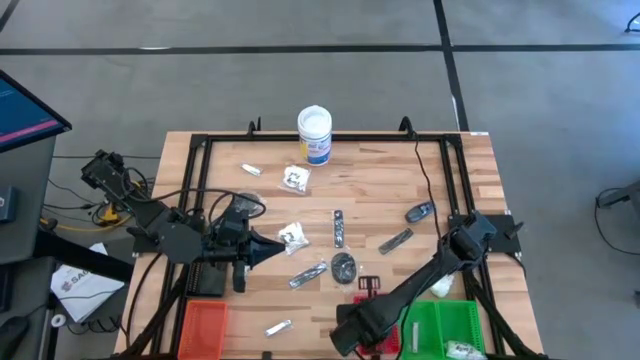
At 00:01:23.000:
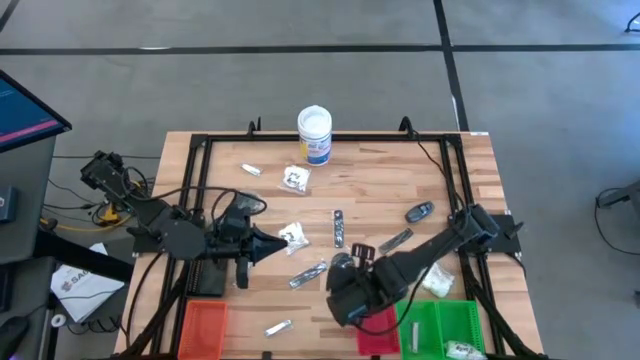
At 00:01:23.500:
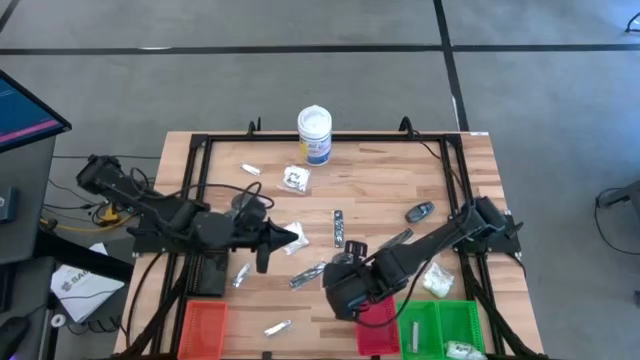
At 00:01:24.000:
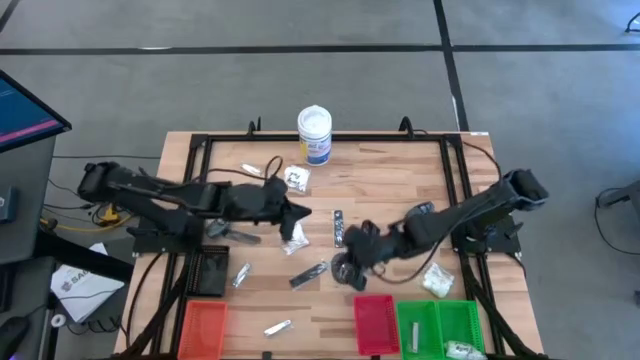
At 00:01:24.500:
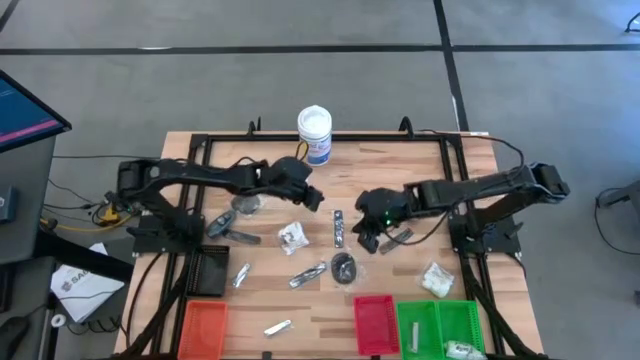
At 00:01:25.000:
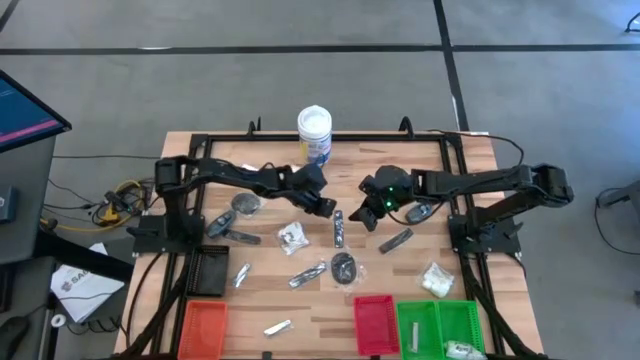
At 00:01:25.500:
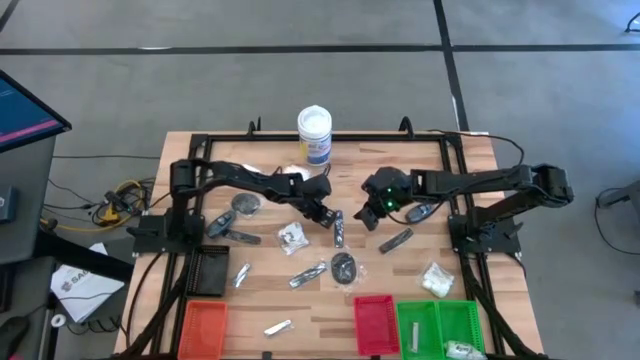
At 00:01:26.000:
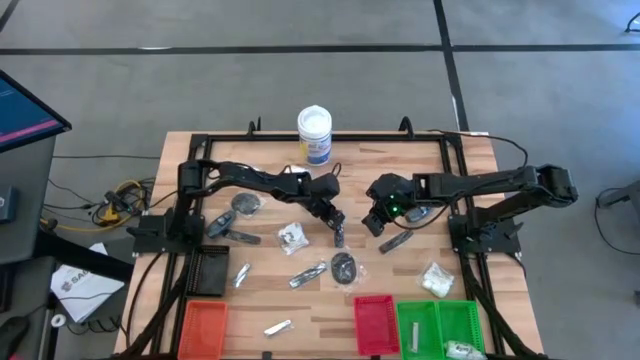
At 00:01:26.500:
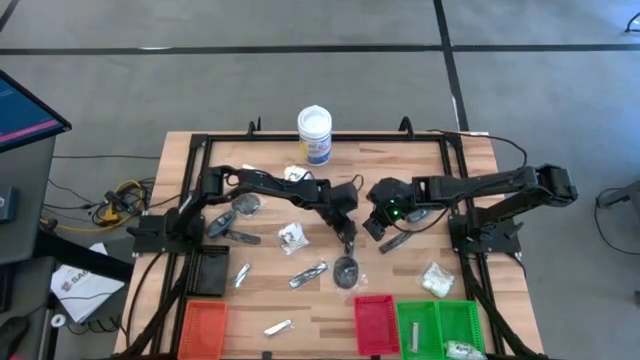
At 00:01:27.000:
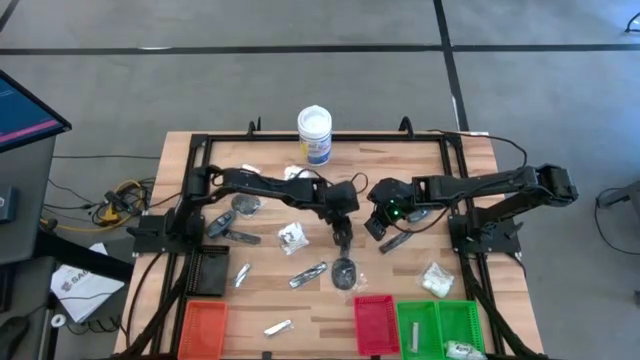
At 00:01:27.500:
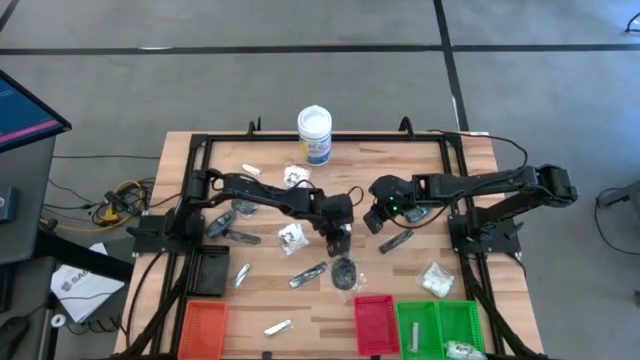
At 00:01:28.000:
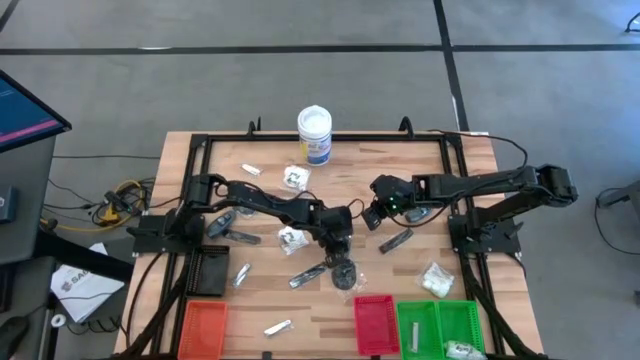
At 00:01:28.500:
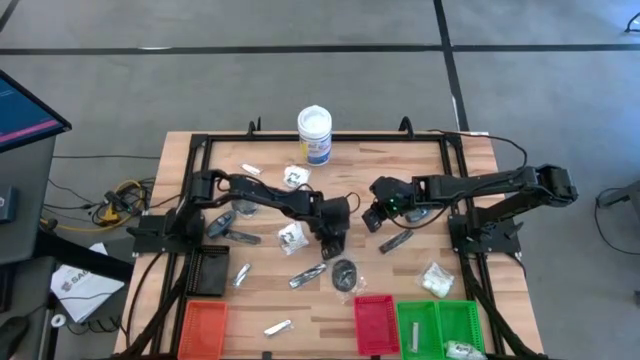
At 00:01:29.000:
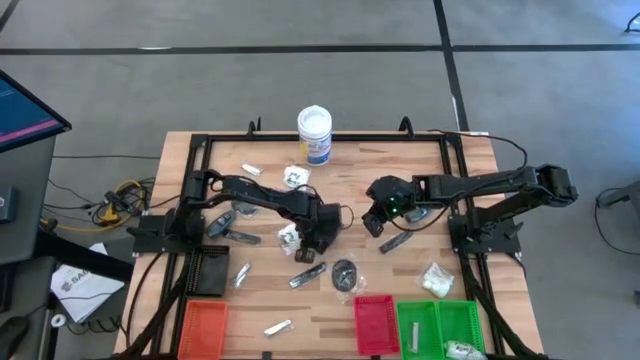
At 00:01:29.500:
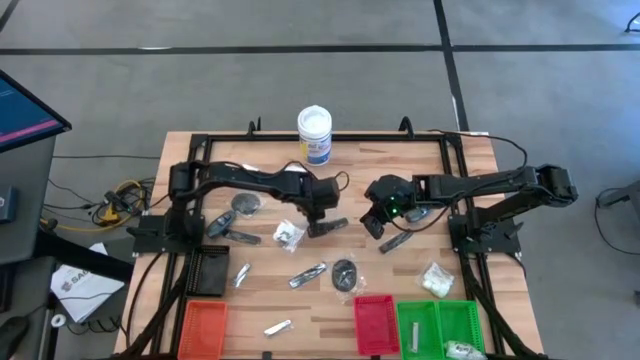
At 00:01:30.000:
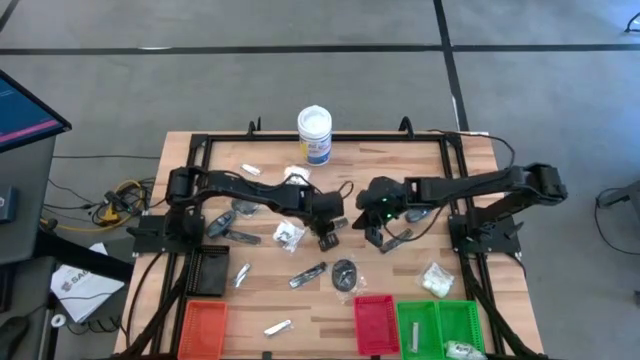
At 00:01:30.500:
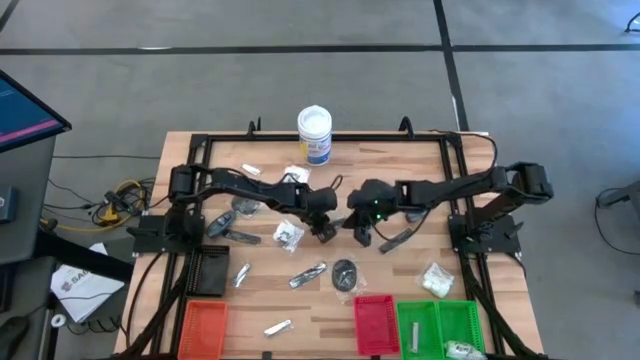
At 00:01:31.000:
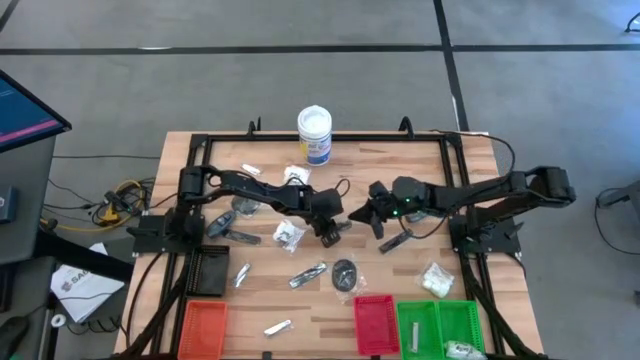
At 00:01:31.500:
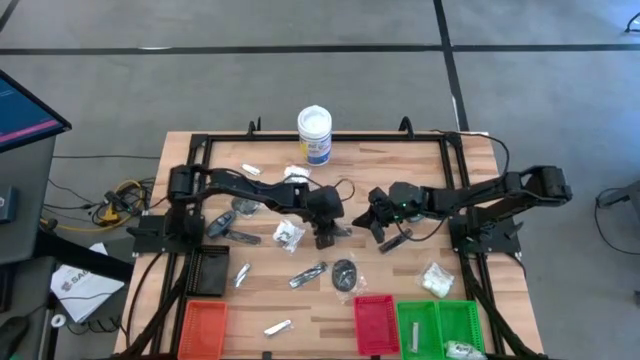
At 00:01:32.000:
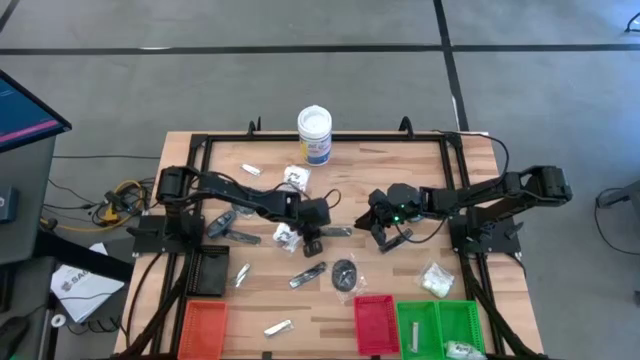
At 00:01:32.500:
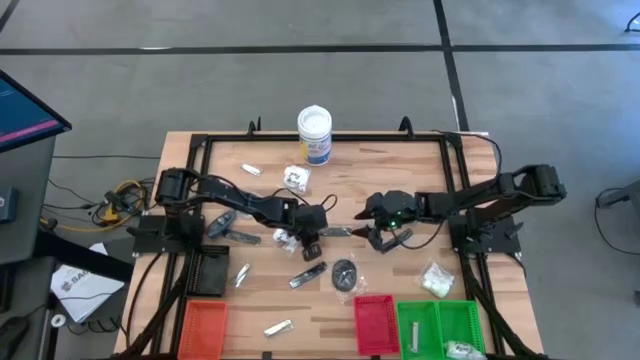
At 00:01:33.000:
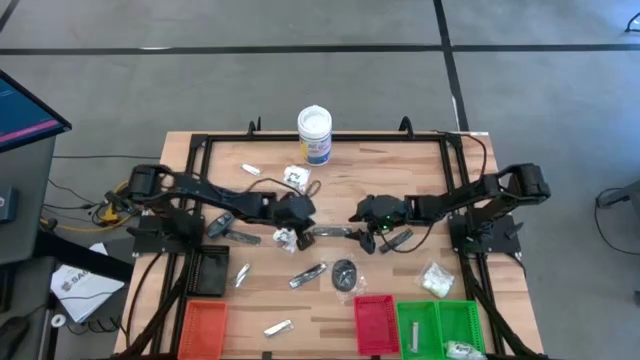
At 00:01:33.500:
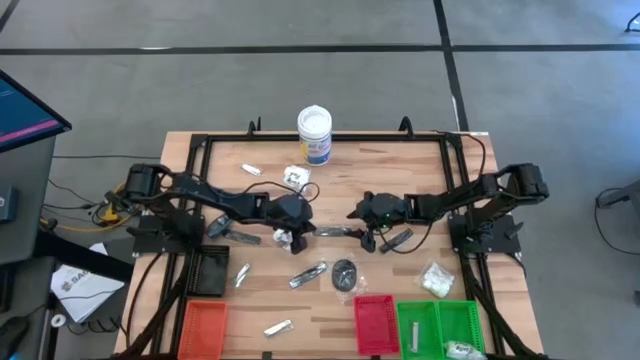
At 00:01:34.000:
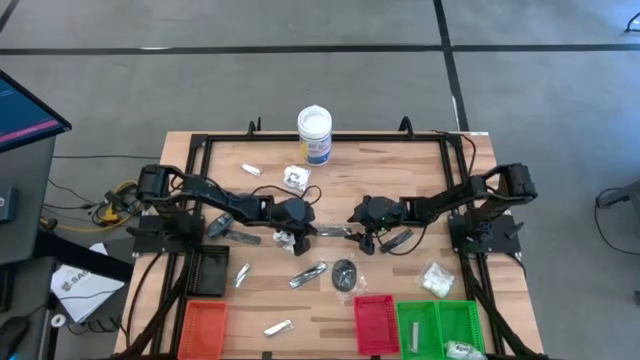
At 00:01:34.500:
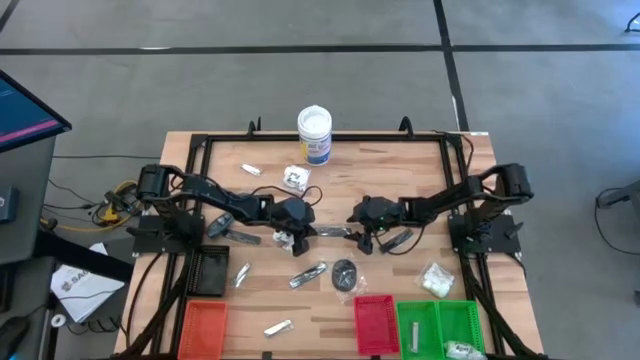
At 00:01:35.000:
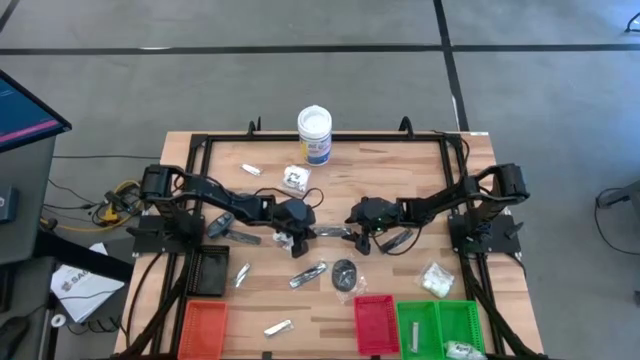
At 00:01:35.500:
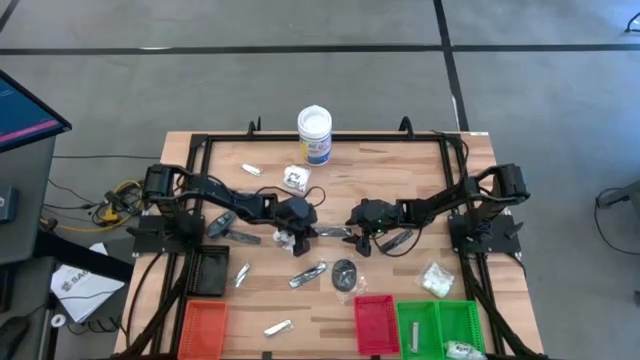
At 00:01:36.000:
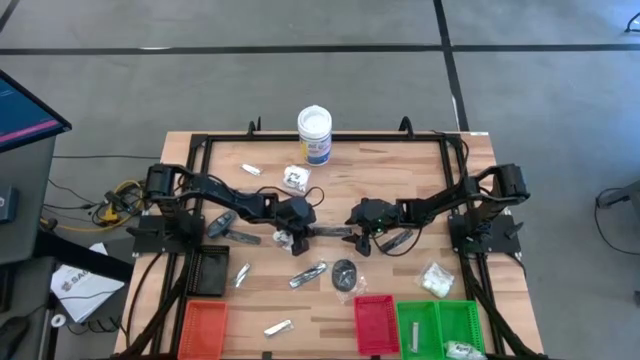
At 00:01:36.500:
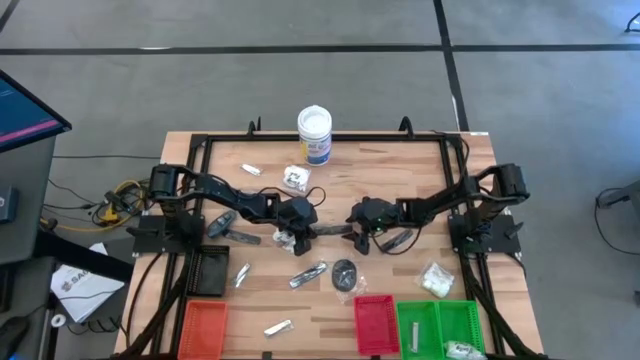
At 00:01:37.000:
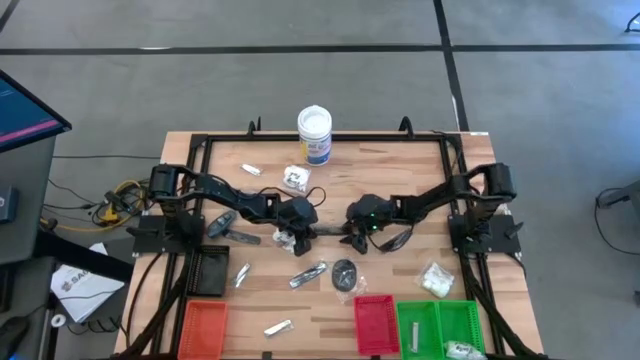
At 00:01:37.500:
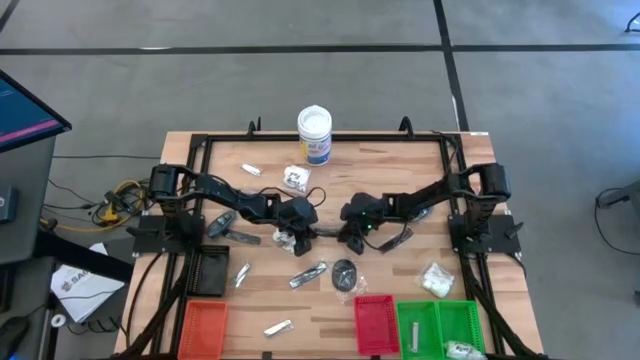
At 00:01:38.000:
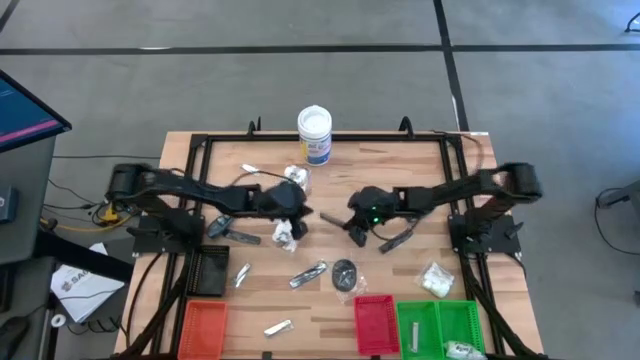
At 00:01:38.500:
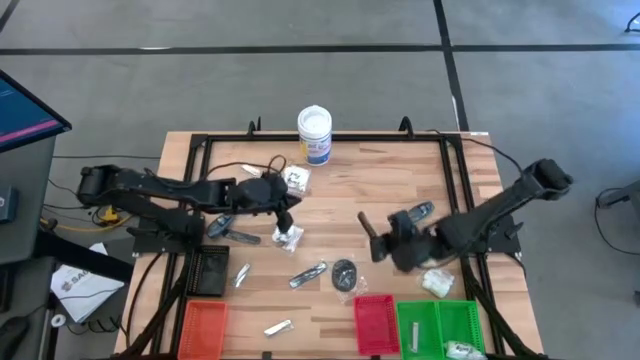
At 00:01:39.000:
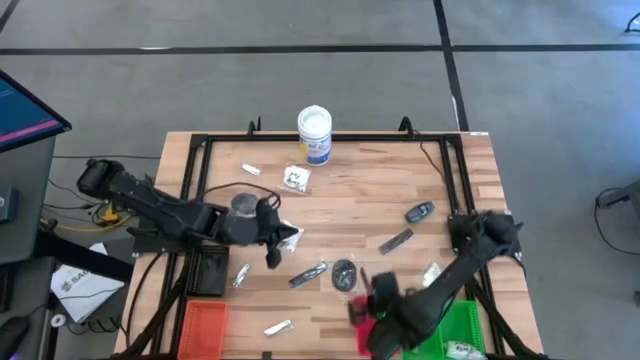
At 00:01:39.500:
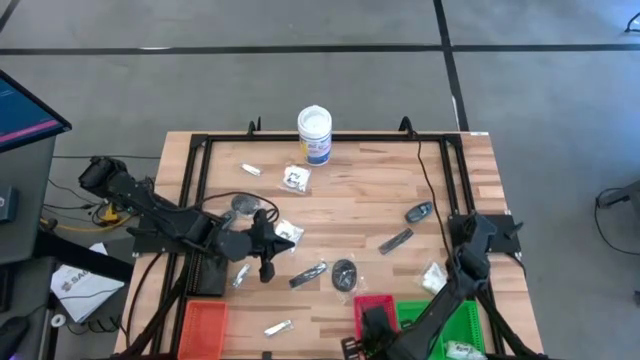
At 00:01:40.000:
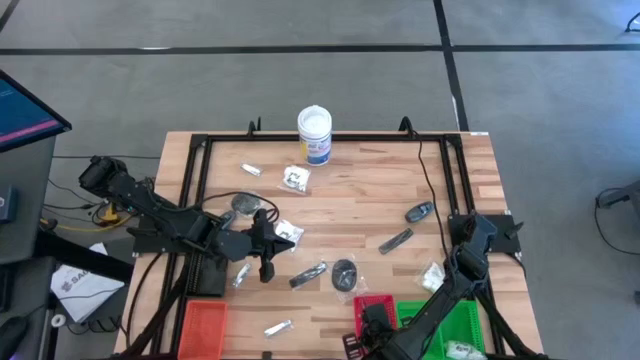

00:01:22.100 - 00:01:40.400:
Task: Pick & Place Travel size toiletries
Put the black comb into the red bin

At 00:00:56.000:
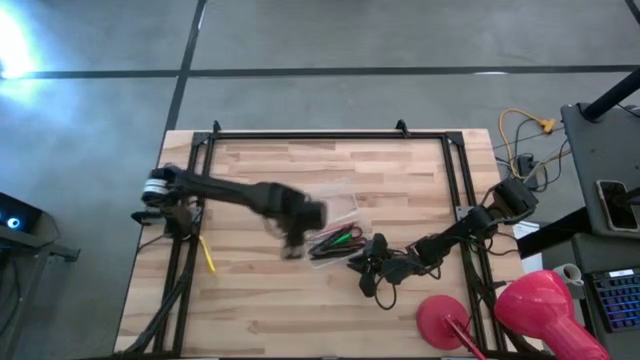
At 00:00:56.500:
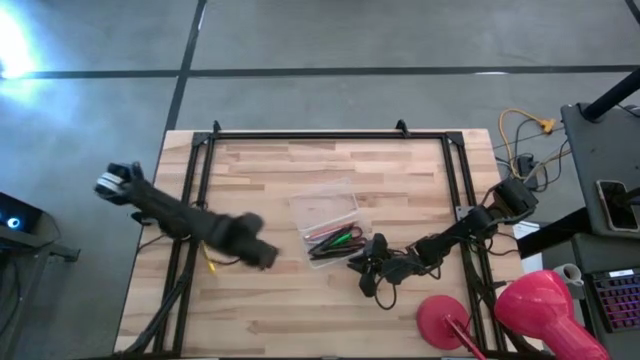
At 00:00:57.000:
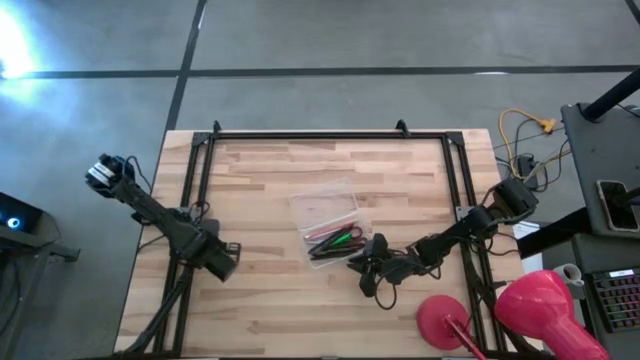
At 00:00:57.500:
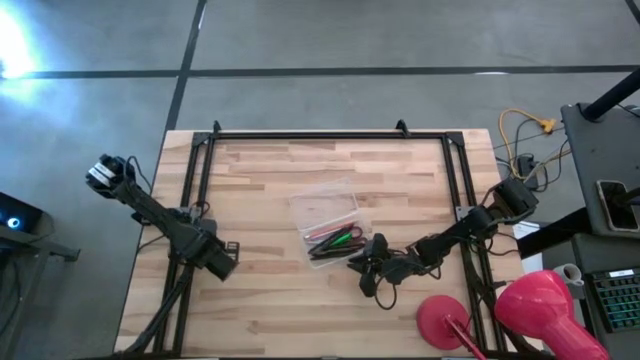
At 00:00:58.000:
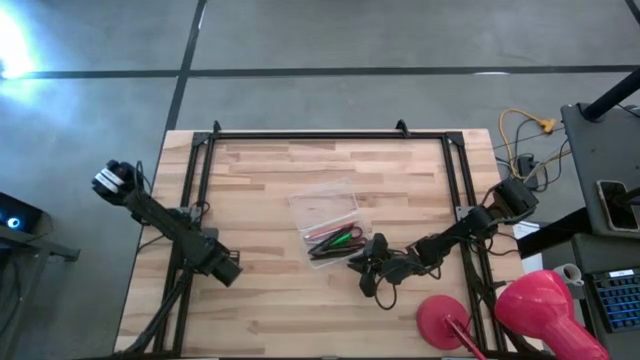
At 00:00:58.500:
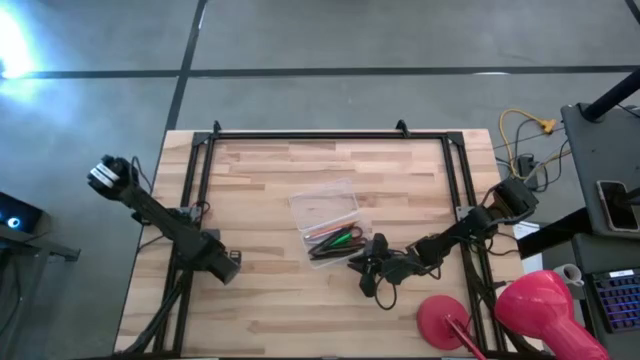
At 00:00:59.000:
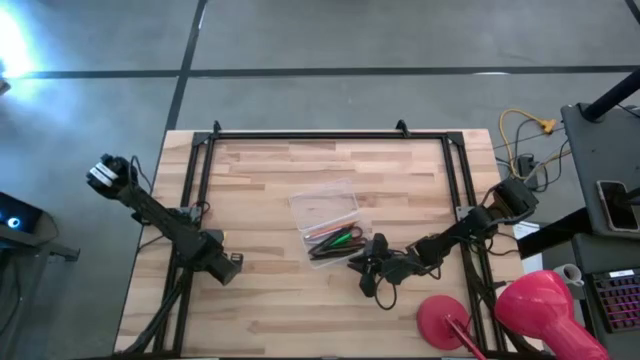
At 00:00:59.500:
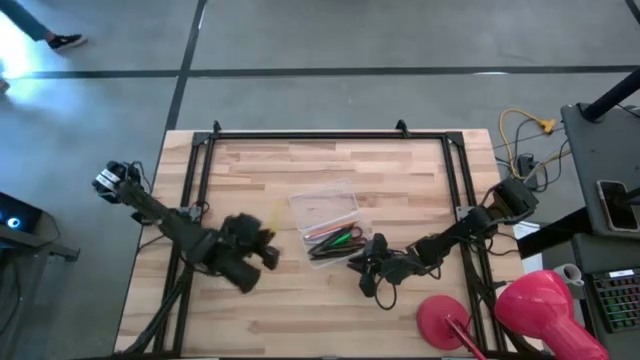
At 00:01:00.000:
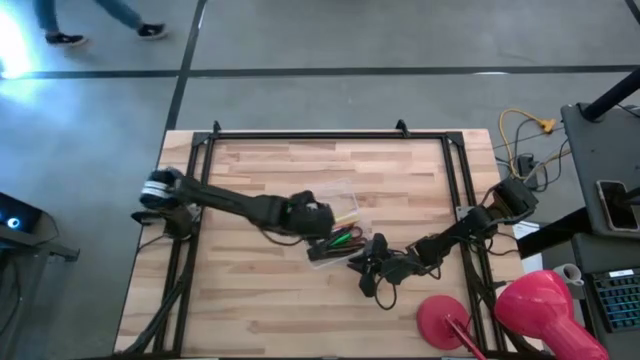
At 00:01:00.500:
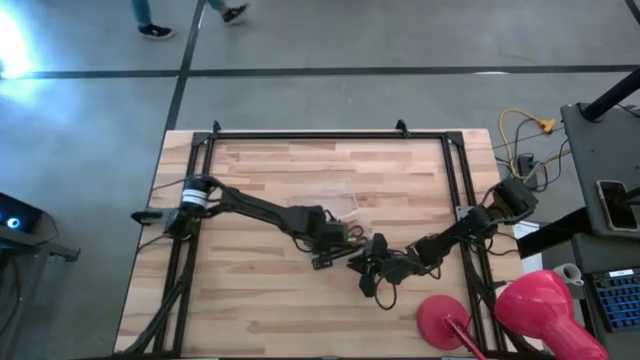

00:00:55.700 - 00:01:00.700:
Task: Pick & place school supplies into a supply box
Put the yellow pen into the transparent supply box
